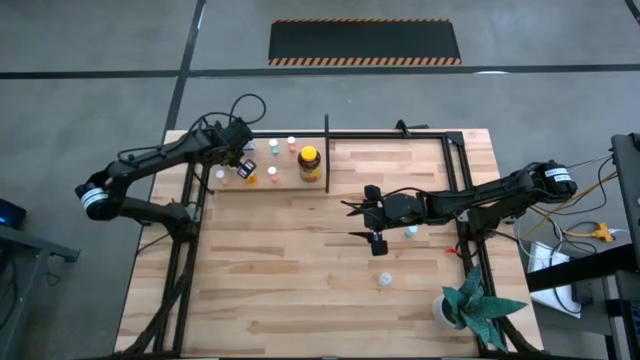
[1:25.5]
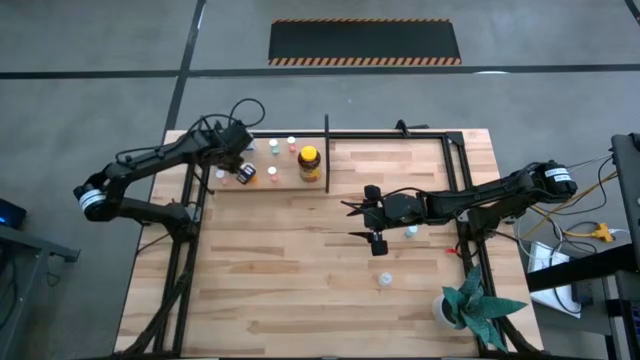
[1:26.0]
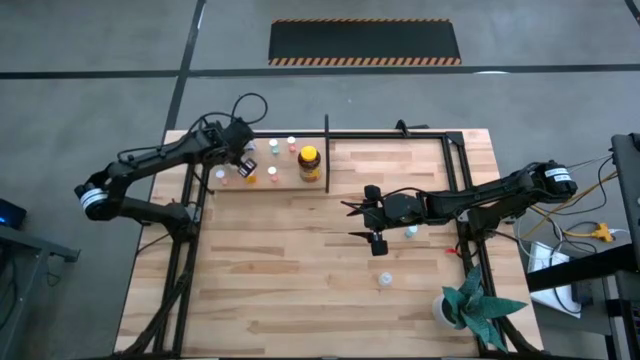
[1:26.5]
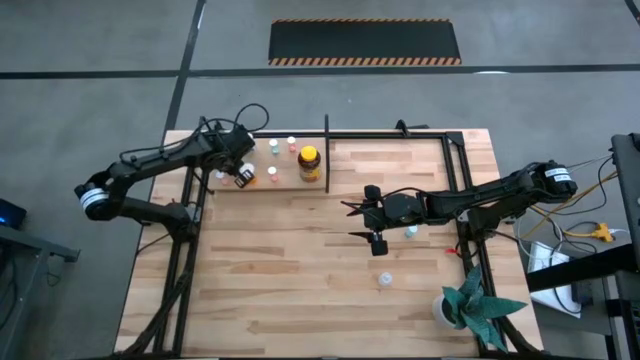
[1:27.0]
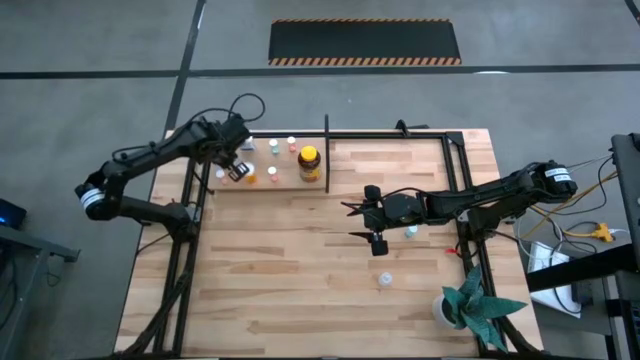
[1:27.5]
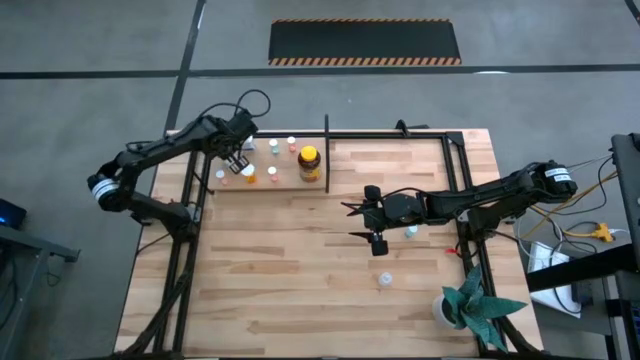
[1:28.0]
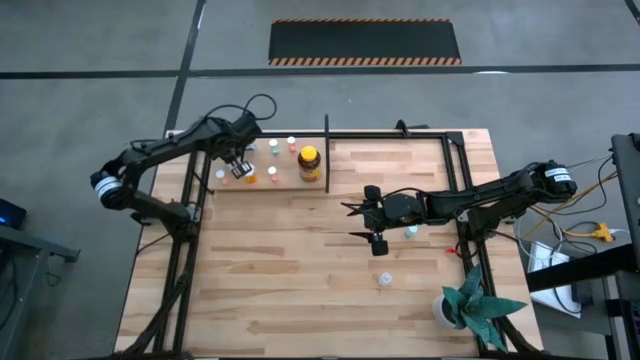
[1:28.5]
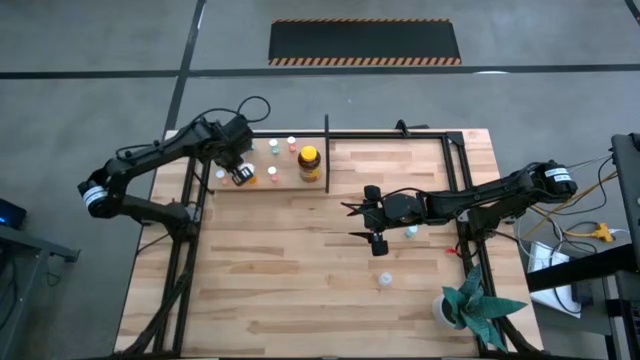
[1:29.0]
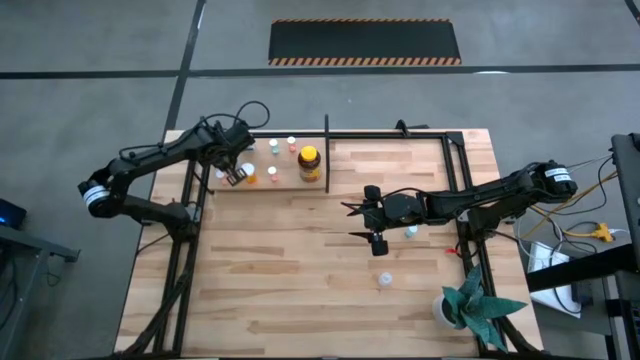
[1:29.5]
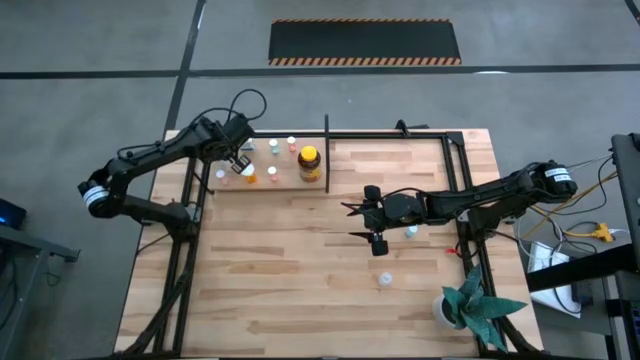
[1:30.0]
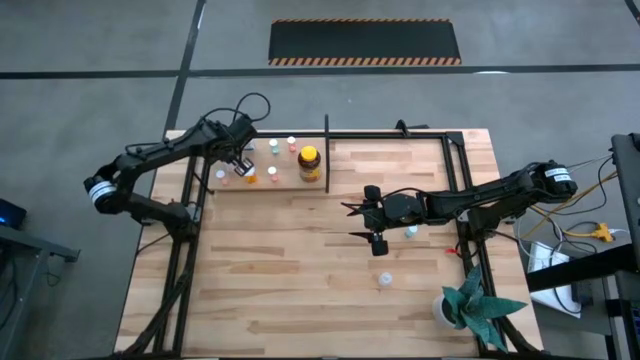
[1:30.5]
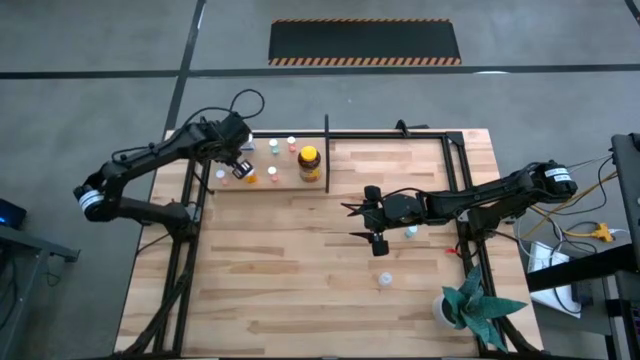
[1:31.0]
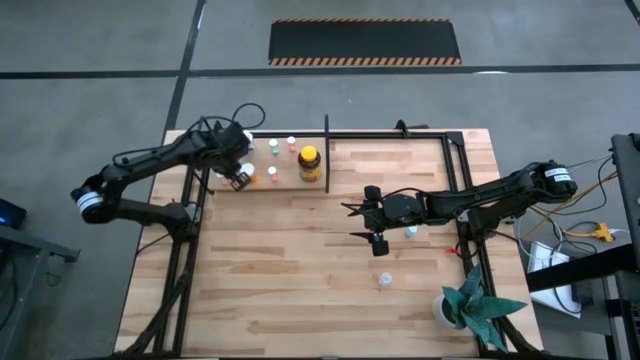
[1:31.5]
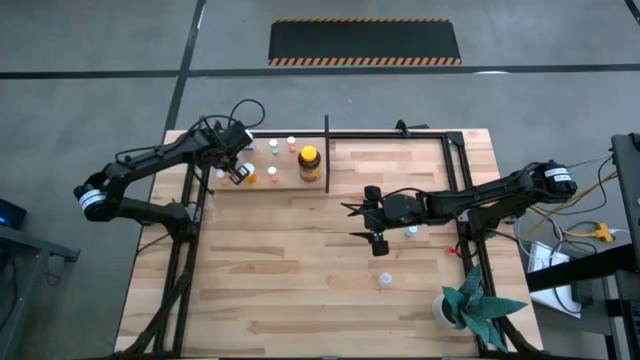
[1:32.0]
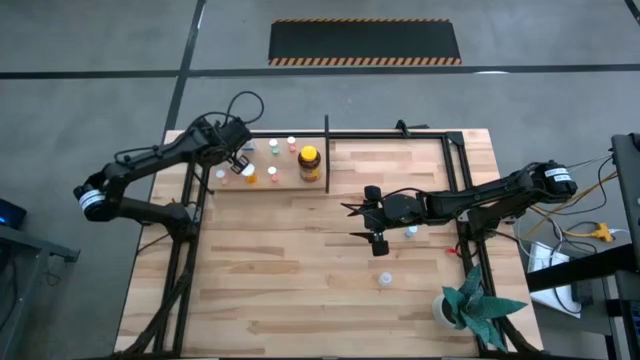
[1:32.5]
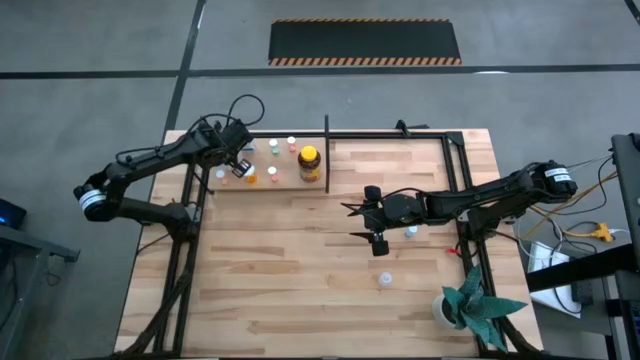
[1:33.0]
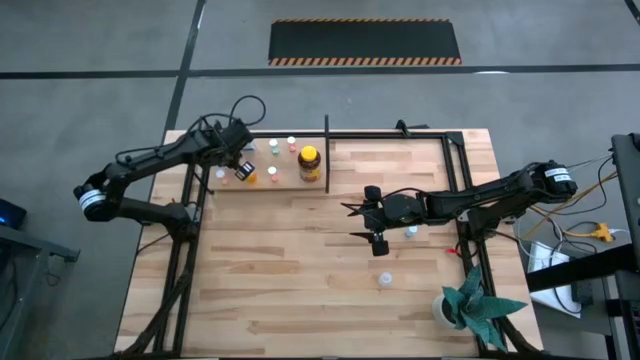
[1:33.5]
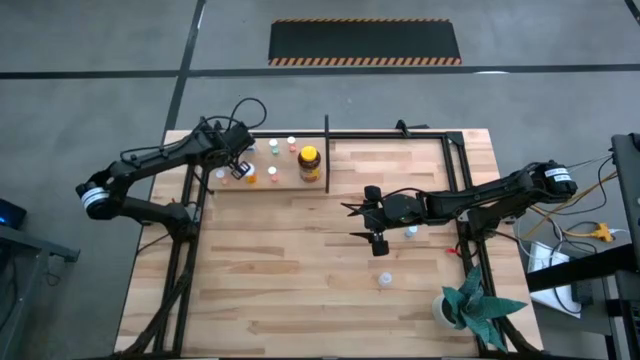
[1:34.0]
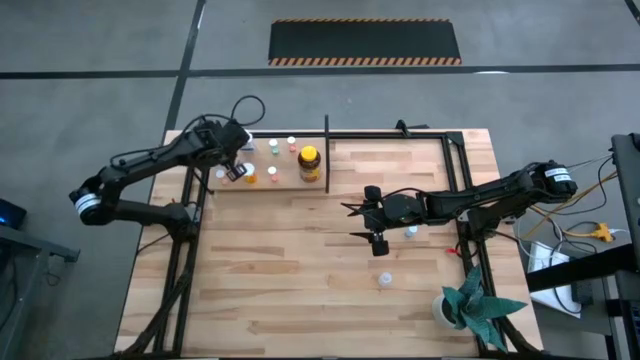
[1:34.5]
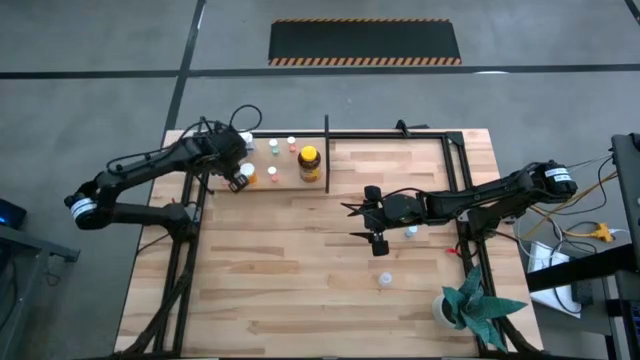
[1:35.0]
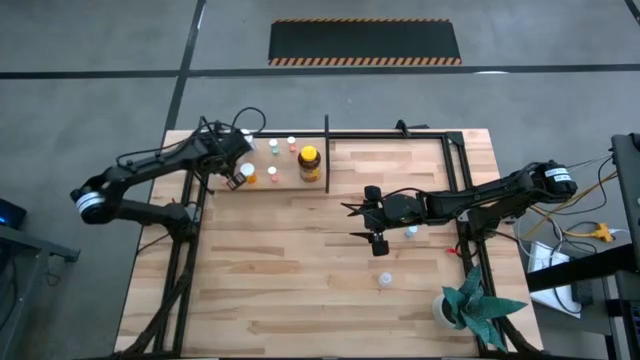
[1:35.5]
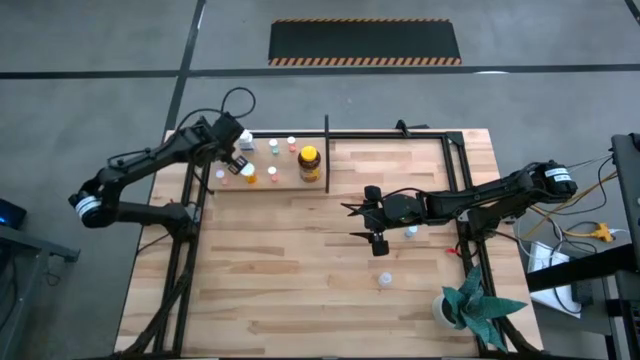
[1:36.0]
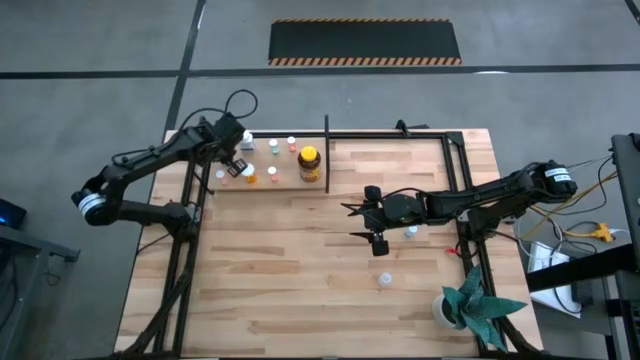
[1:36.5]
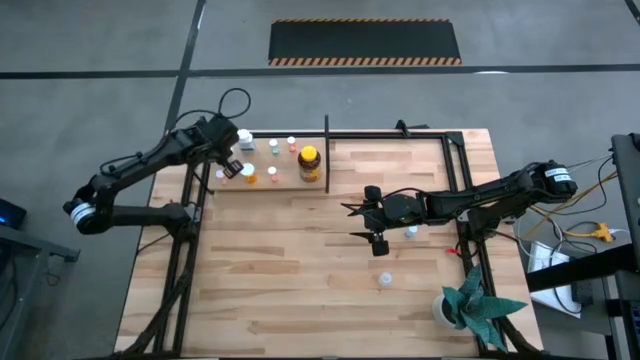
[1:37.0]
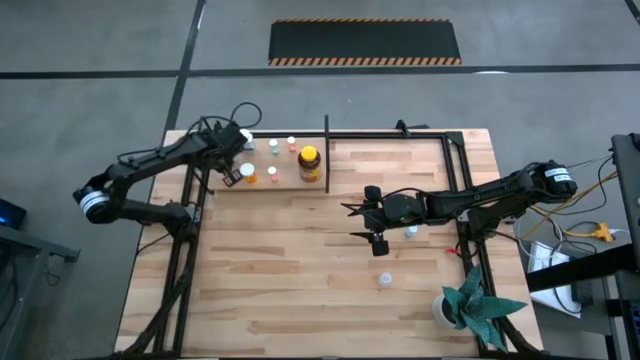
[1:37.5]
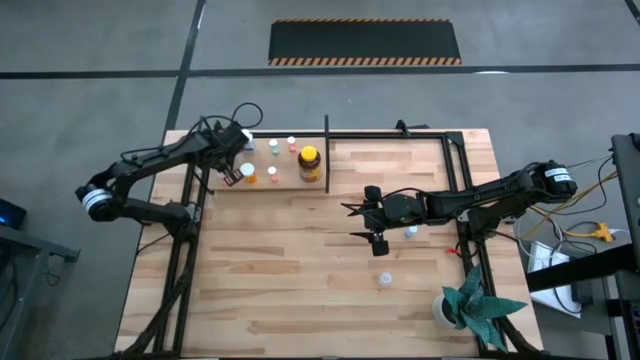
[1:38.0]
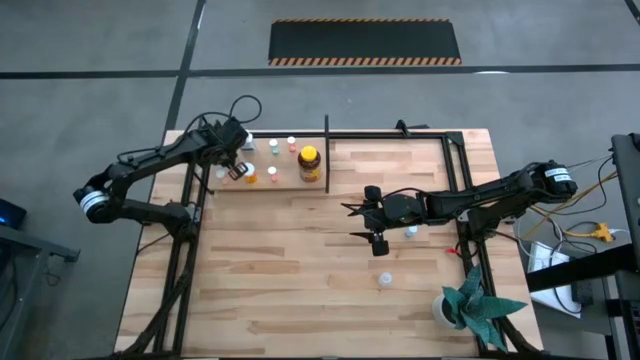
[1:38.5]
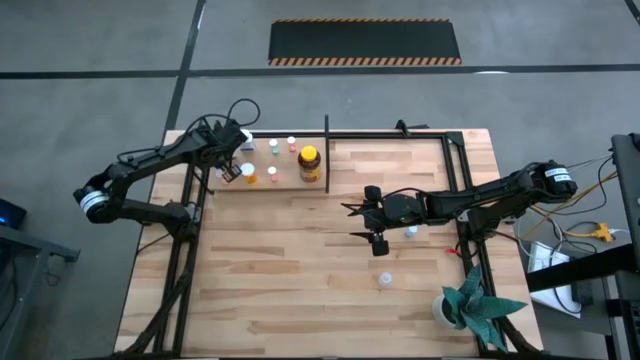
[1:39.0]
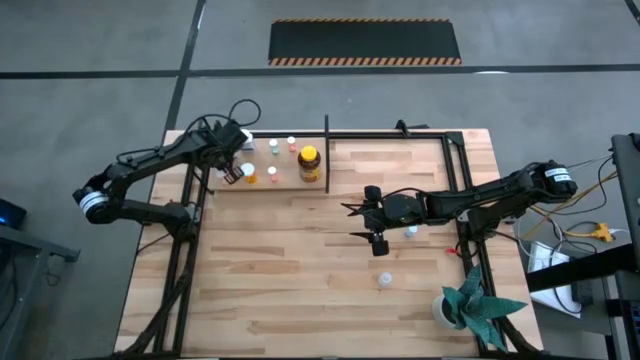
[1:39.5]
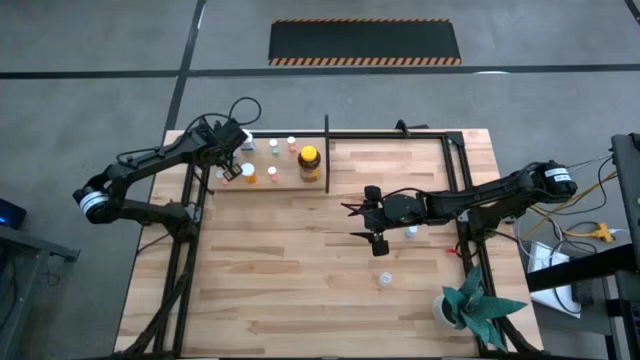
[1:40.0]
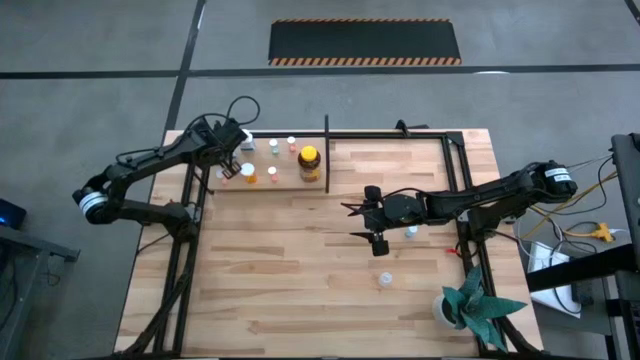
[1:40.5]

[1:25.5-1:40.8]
Task: Pick and place medicine bottles onto shelf by color
Put the white pill bottle on the shelf

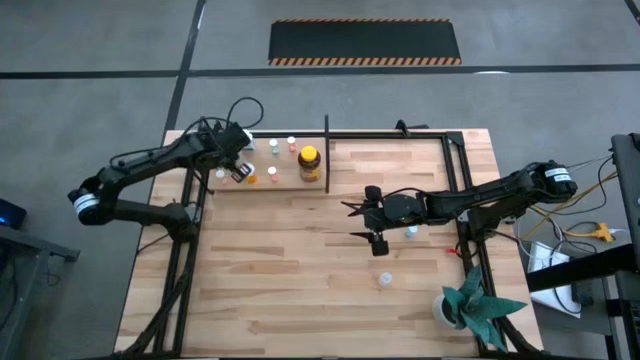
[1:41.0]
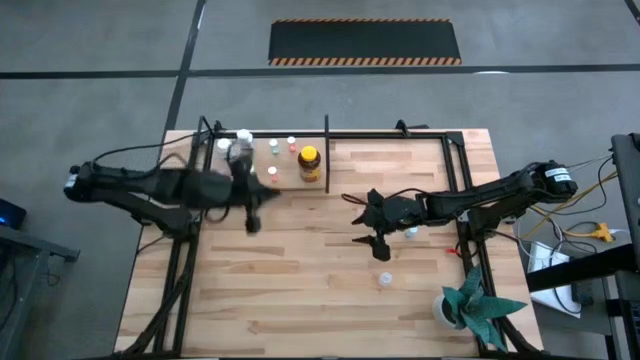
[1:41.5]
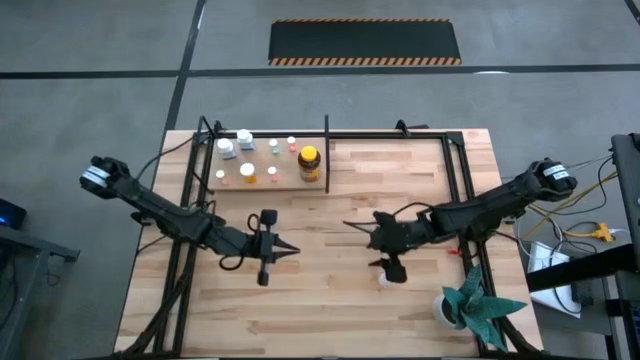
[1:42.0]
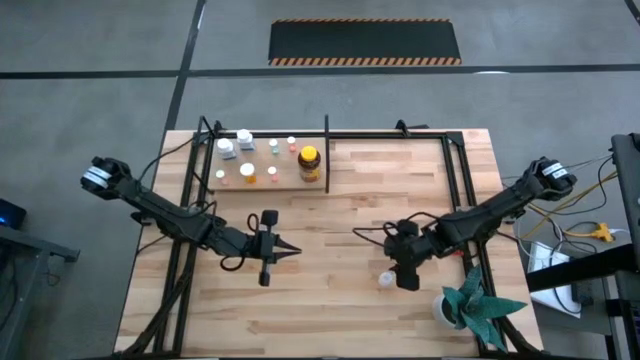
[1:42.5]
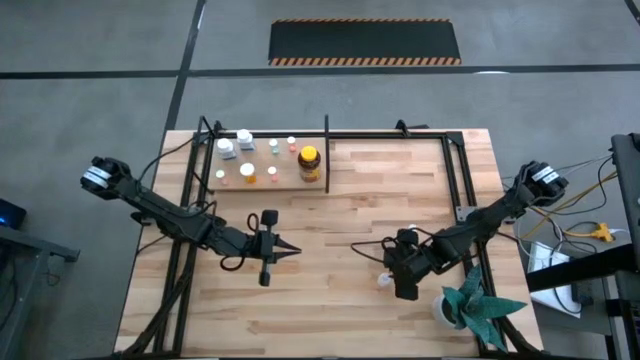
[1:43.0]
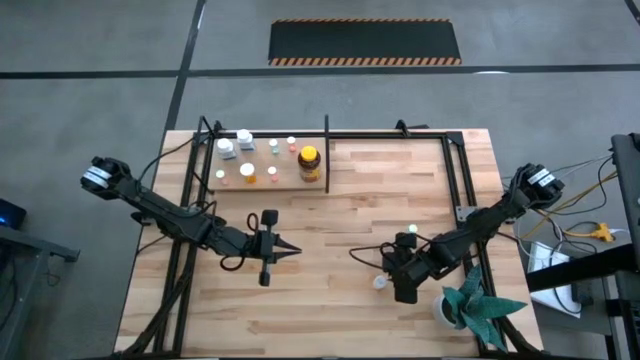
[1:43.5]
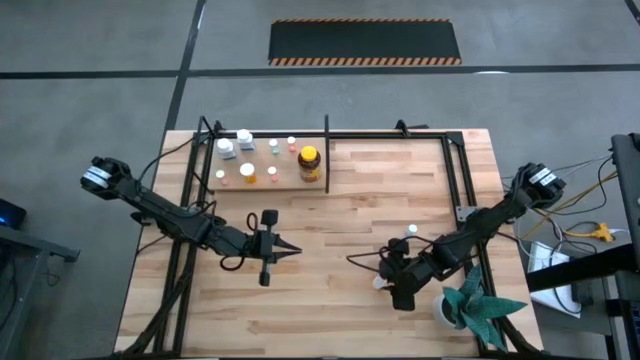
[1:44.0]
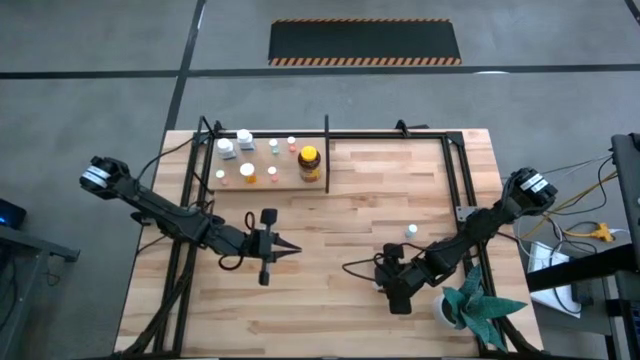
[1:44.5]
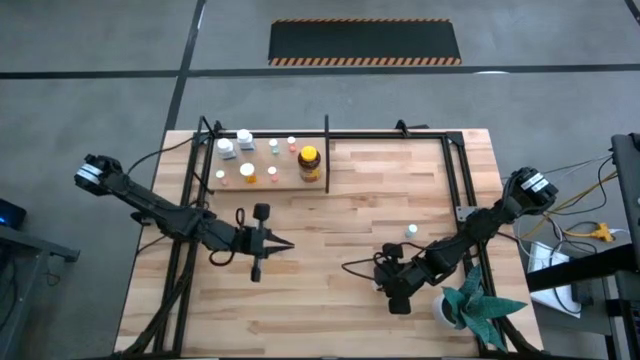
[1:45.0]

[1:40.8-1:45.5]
Put the transparent pill bottle on the shelf
